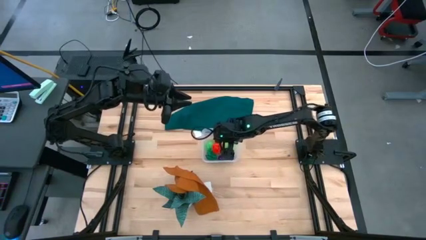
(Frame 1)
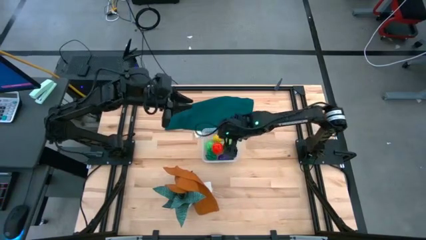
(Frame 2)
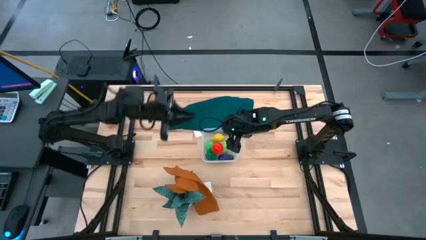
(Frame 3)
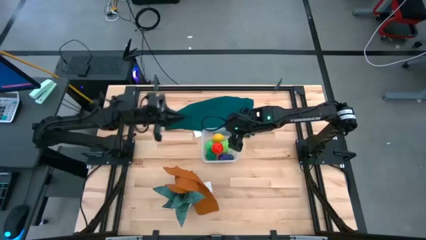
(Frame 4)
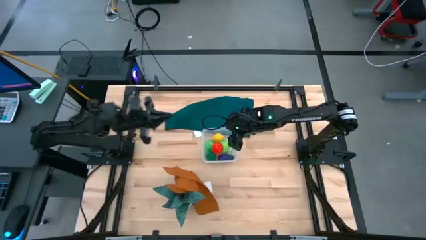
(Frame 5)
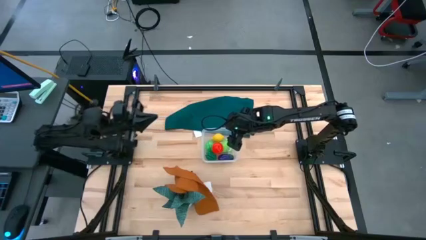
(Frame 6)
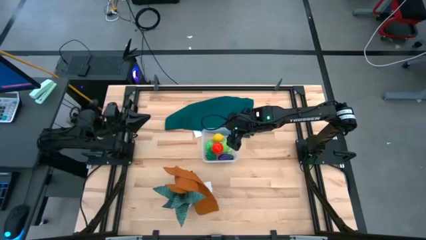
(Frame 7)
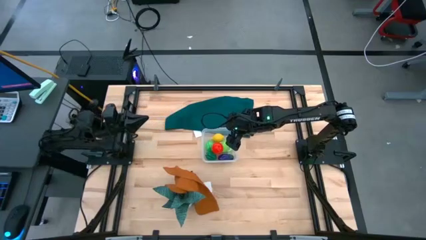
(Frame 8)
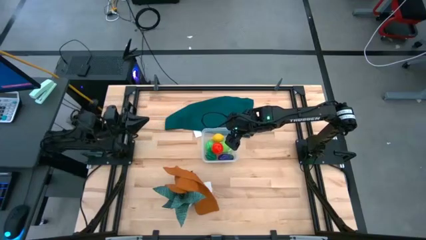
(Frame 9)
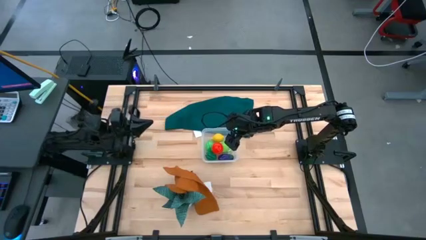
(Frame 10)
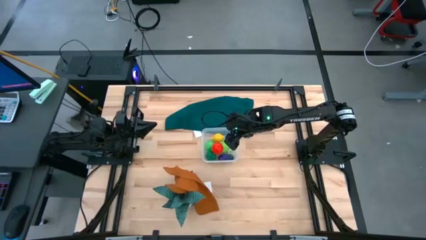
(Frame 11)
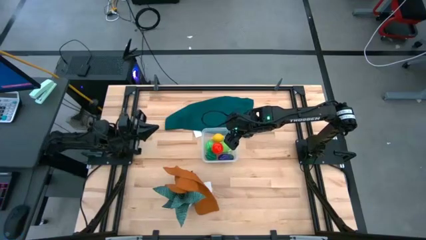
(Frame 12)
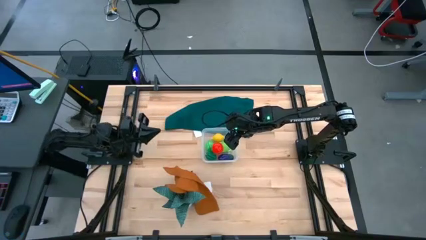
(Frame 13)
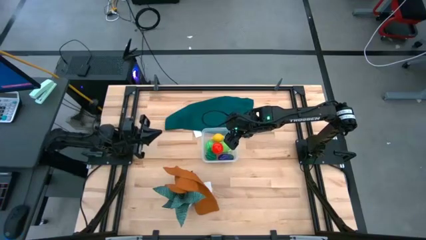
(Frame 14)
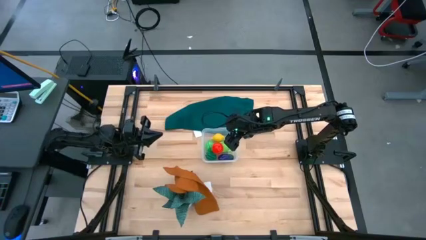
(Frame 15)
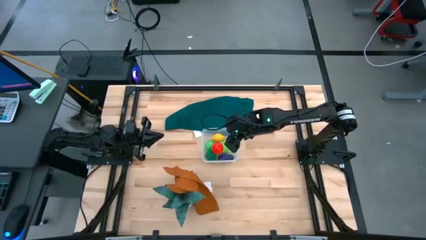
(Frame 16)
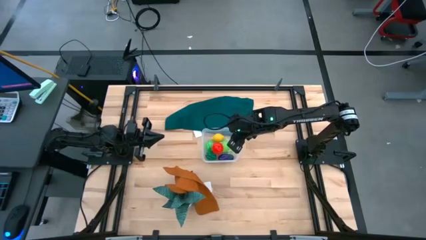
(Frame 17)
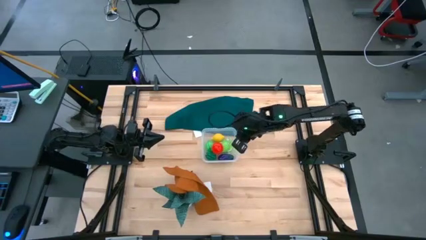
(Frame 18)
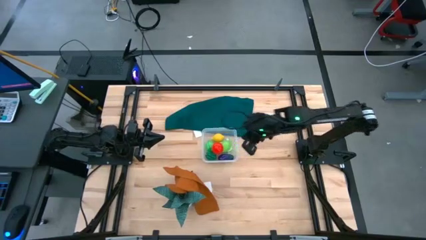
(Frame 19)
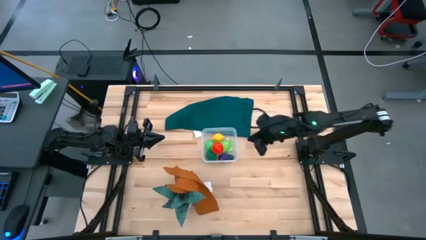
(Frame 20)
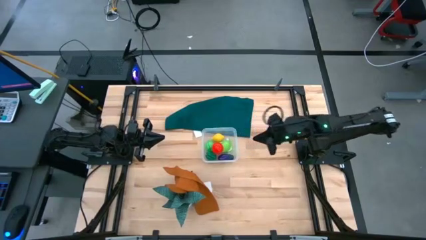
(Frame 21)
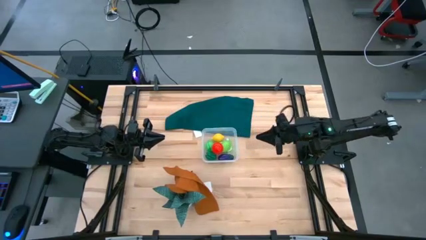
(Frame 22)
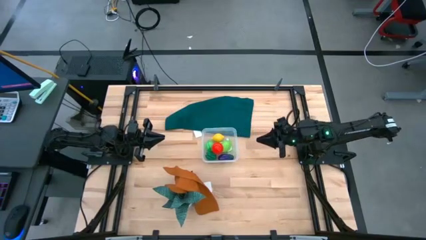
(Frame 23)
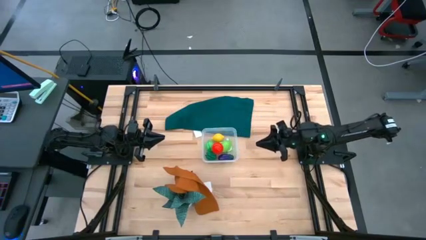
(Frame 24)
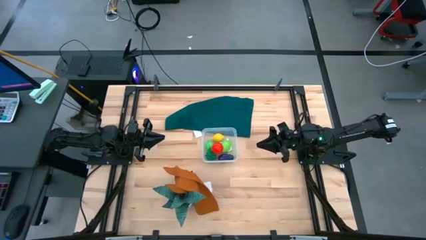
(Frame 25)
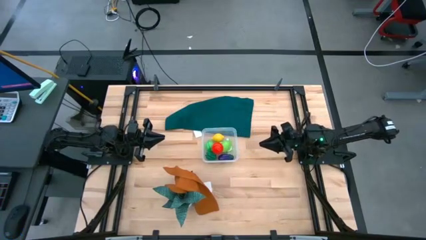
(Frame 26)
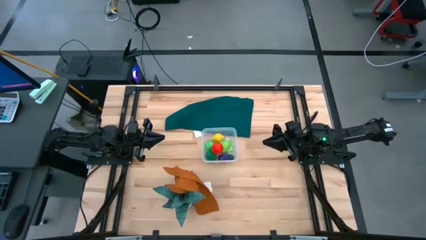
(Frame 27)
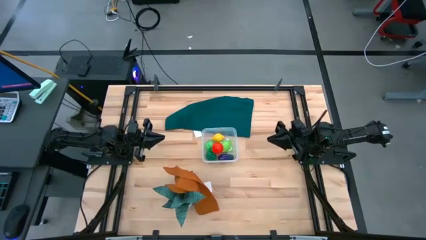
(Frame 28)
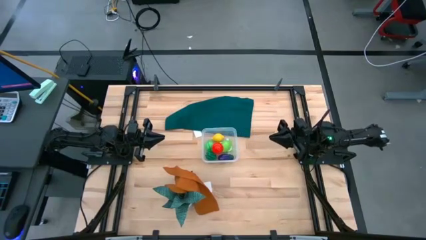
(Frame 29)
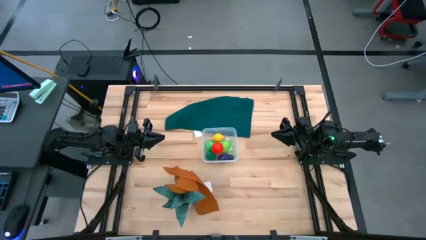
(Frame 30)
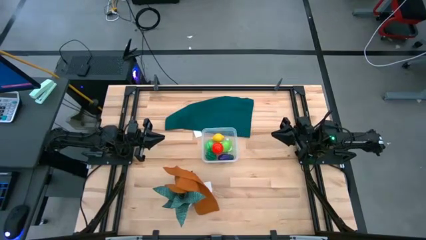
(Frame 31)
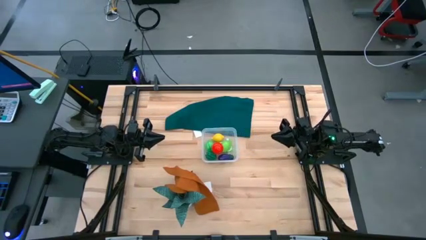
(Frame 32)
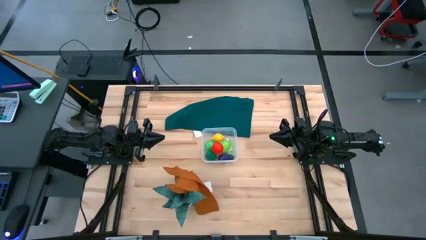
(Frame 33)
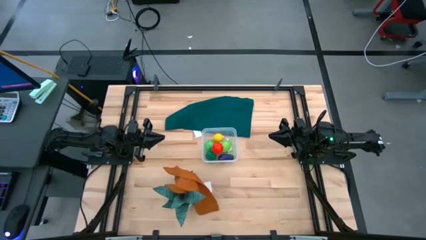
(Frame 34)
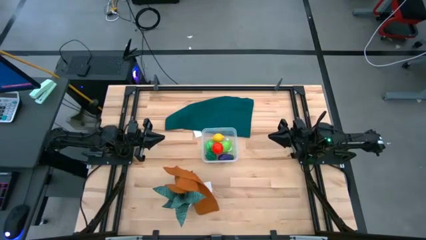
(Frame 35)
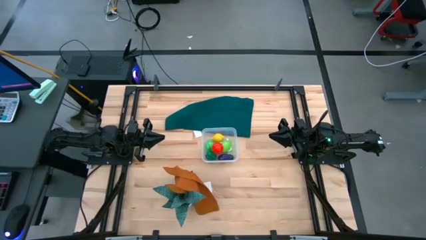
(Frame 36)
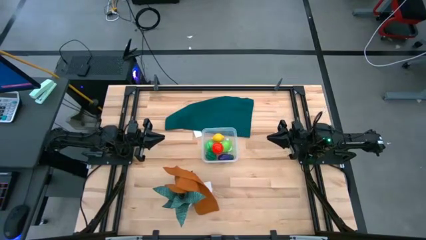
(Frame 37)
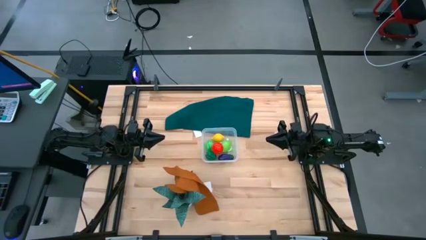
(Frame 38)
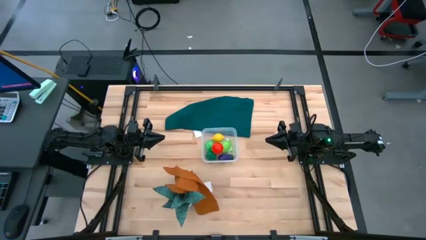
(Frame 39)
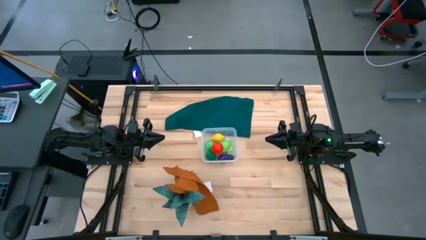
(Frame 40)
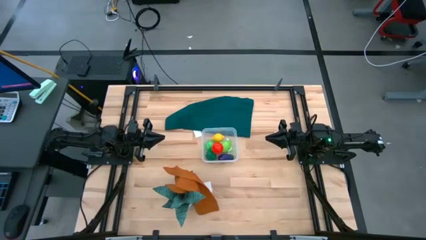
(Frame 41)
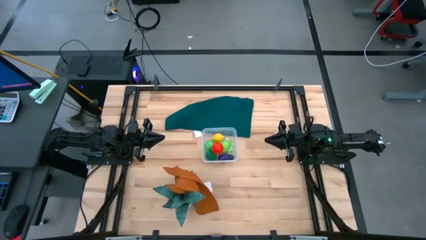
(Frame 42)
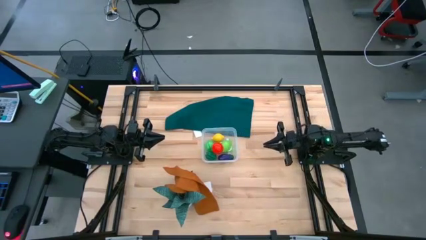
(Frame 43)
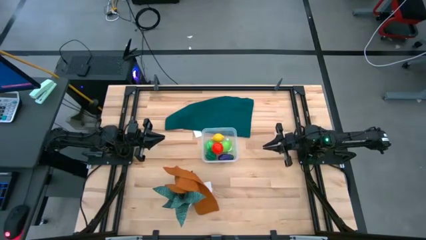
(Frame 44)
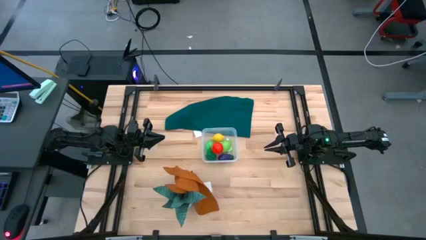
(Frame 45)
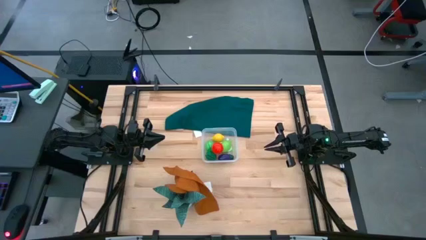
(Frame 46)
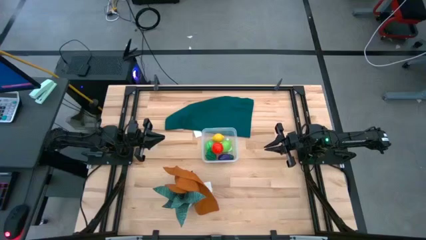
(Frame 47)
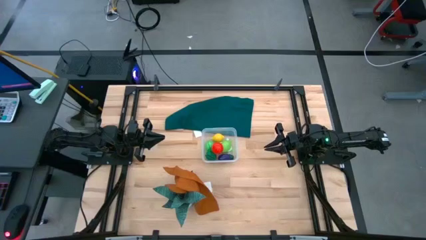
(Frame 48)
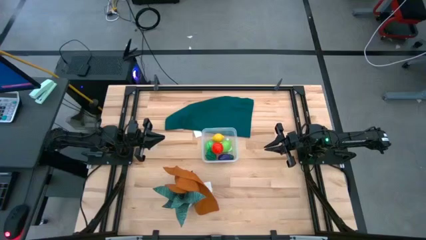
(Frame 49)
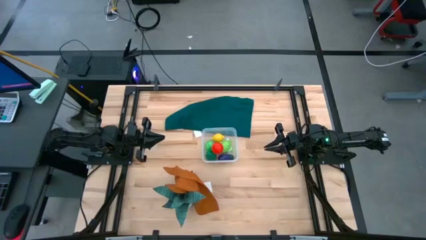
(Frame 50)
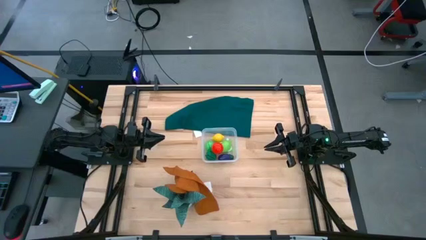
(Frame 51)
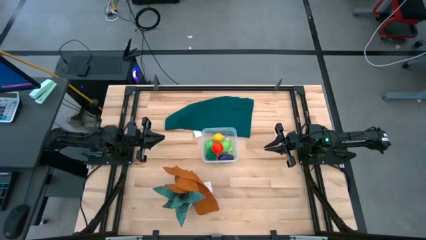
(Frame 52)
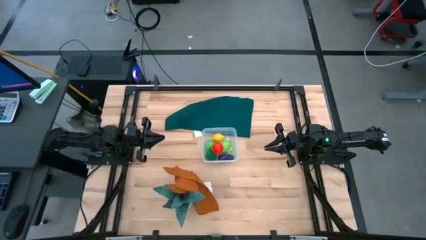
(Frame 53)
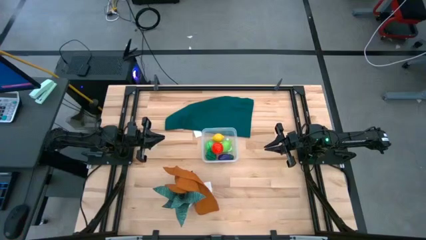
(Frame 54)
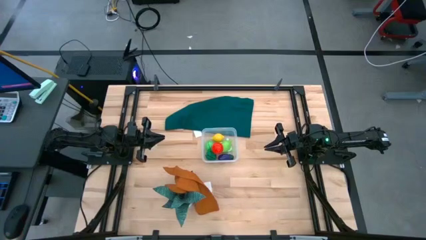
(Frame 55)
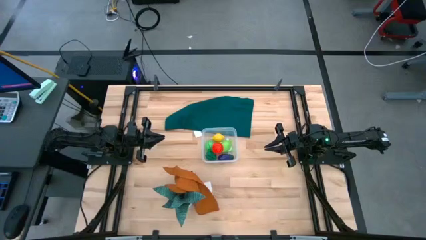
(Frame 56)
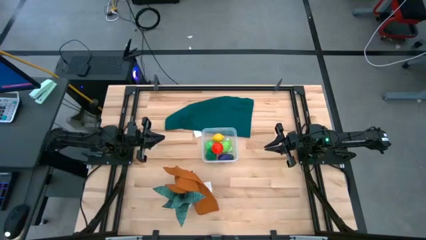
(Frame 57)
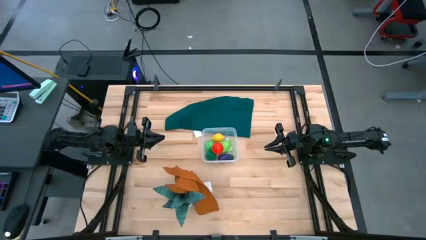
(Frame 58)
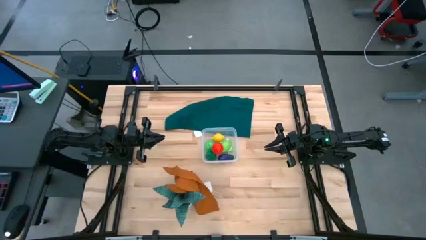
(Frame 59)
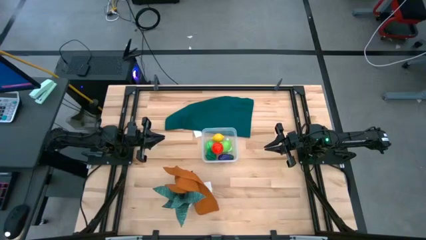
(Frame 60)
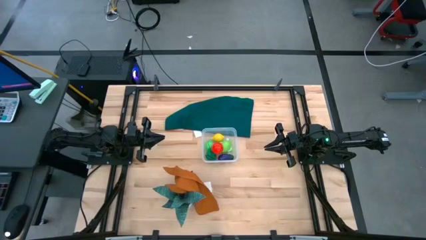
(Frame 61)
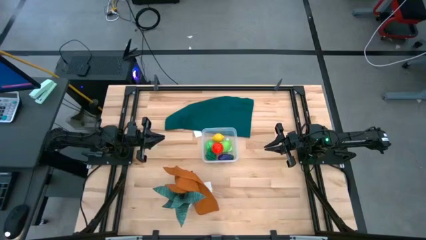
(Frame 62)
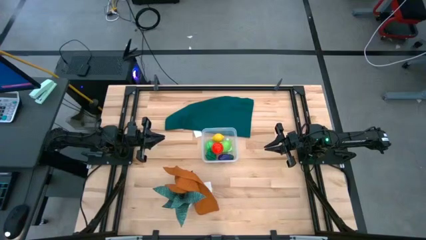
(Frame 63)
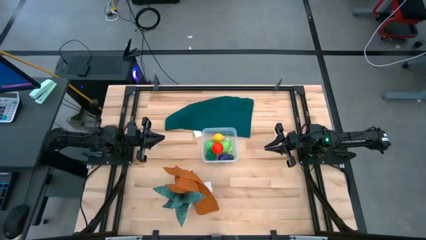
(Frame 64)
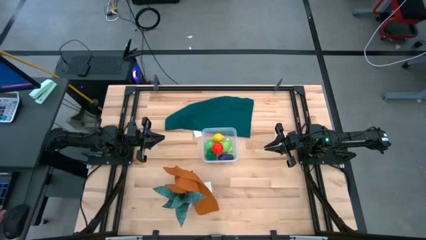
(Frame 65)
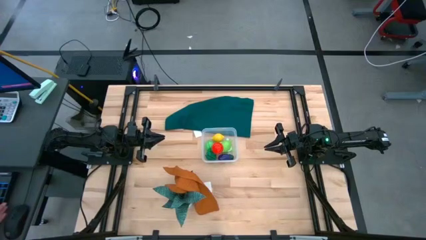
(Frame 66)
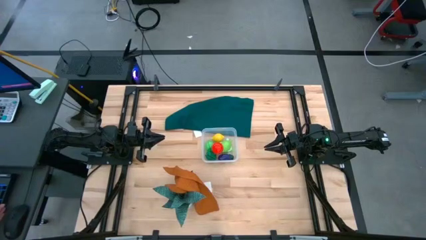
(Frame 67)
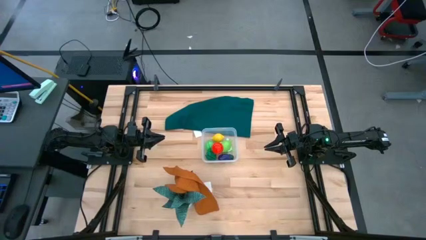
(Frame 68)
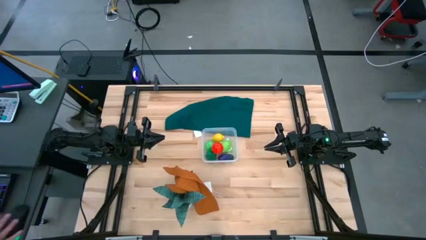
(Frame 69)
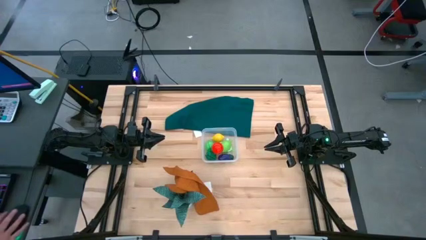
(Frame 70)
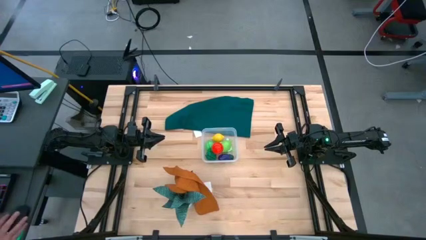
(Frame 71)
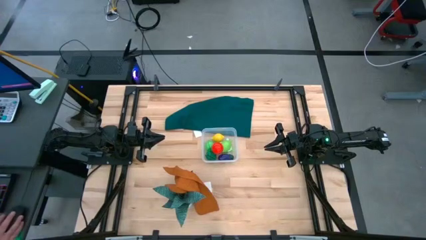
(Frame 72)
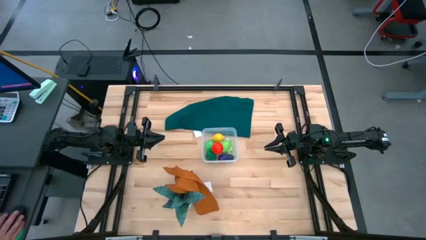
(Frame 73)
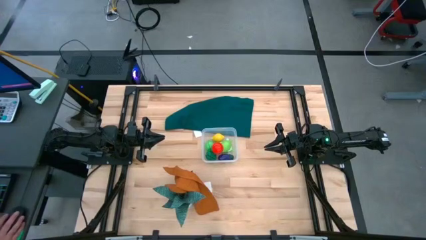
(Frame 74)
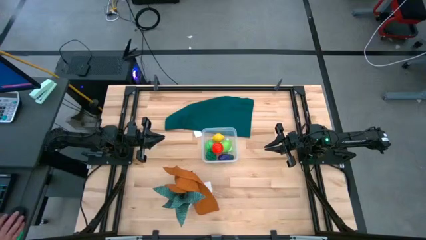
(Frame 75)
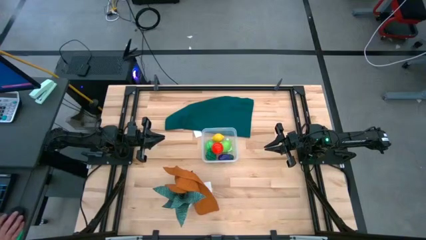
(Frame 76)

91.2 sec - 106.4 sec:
Task: Pick and placing Produce into tupperware
Return to Home Position

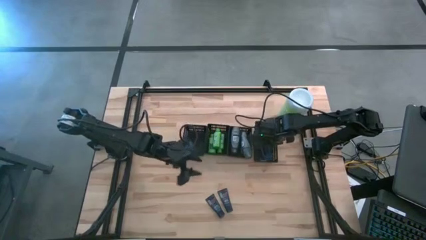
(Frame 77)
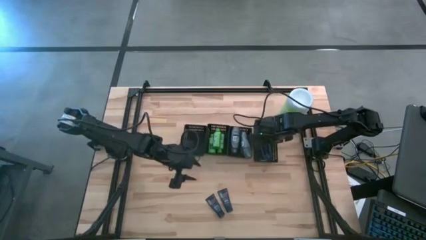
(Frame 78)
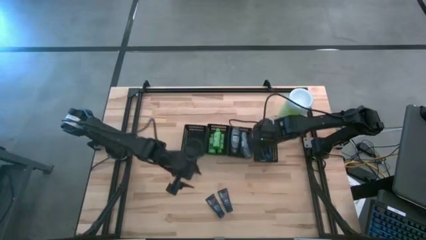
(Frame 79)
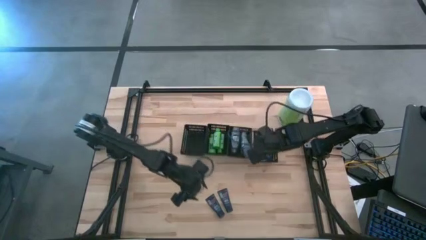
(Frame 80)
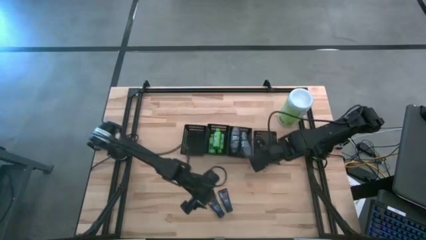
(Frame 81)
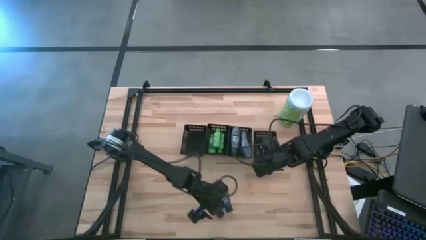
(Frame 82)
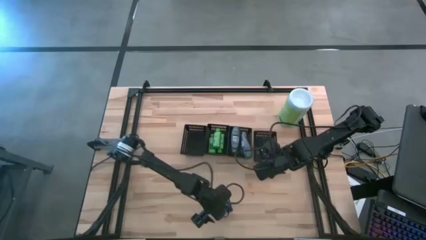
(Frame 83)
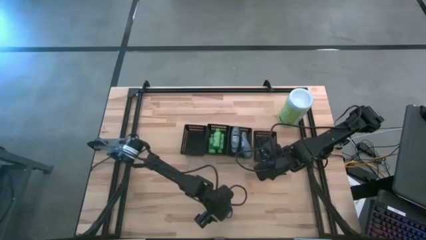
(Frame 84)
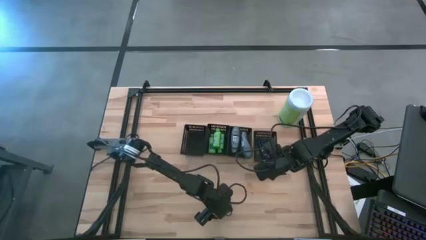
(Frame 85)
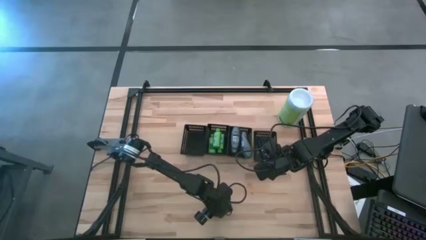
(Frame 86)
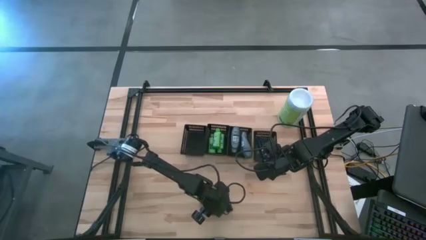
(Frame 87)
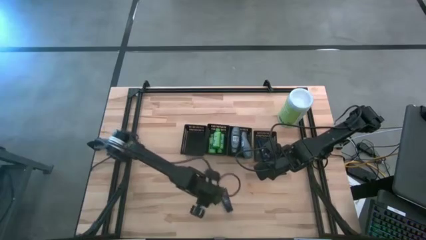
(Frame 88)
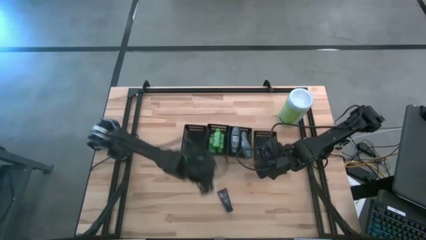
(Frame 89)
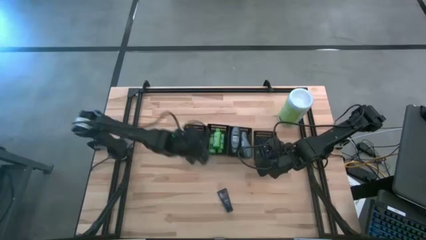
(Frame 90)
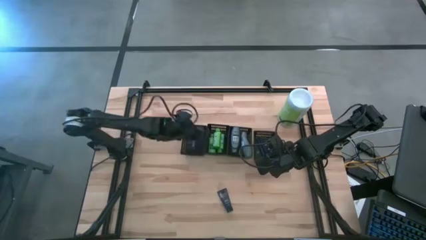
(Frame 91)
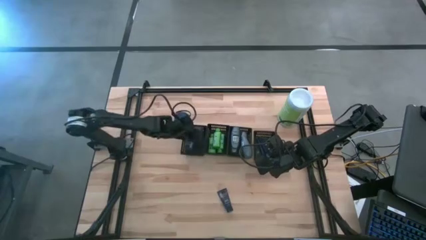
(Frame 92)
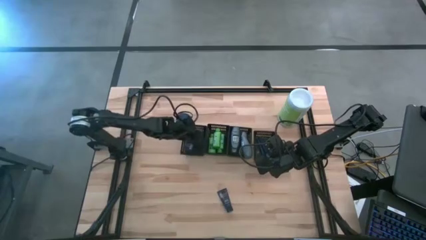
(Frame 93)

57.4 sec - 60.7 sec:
Task: Pick & Place Travel size toiletries
Put the shaving cream into the left black bin
